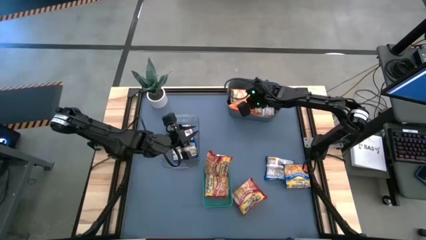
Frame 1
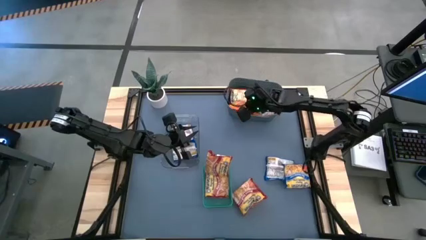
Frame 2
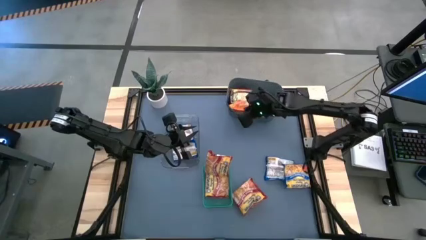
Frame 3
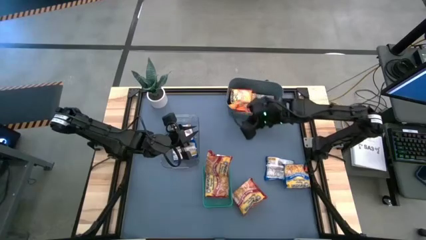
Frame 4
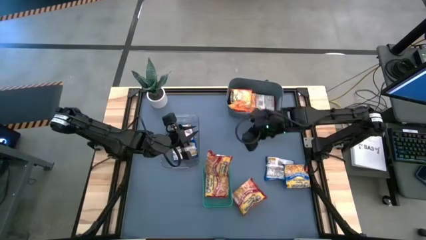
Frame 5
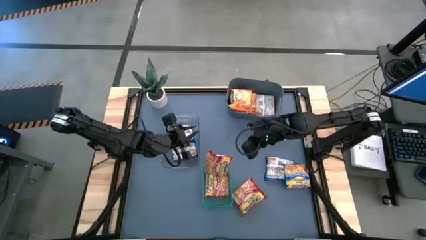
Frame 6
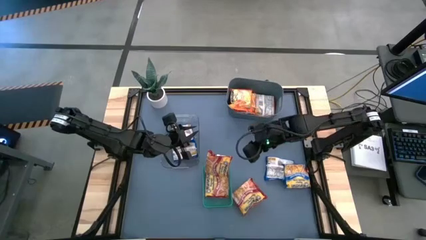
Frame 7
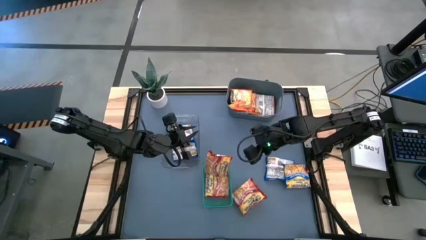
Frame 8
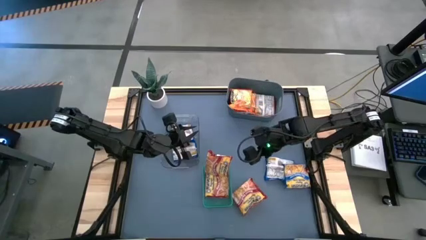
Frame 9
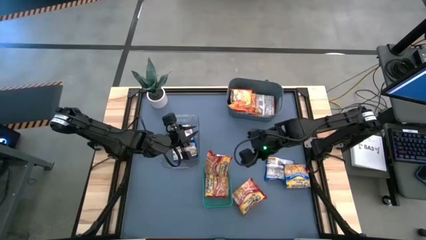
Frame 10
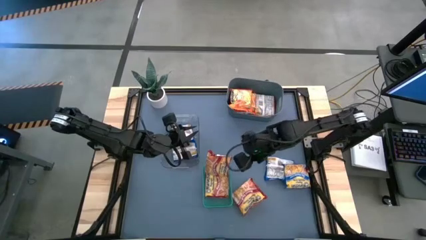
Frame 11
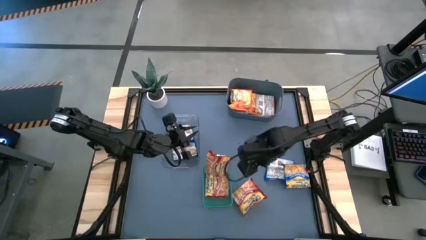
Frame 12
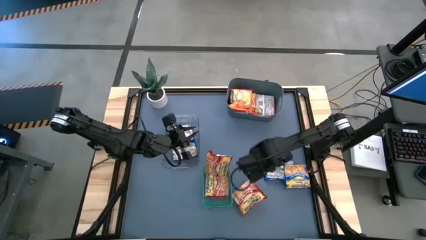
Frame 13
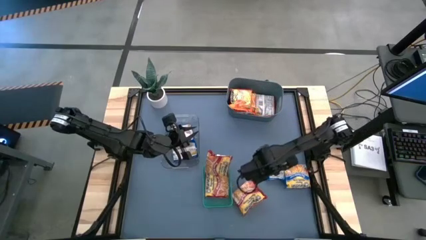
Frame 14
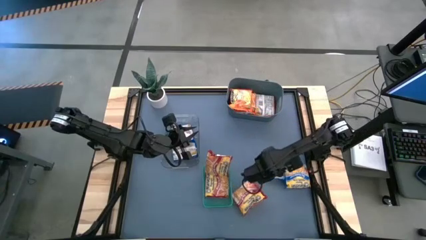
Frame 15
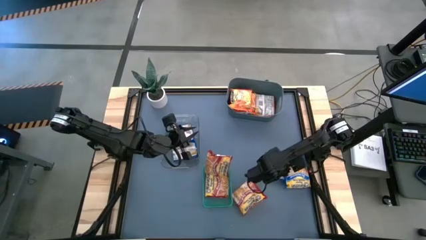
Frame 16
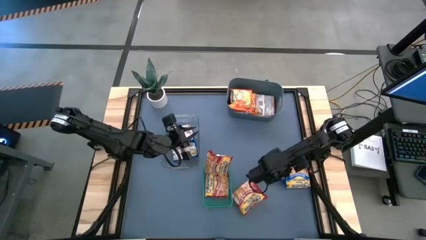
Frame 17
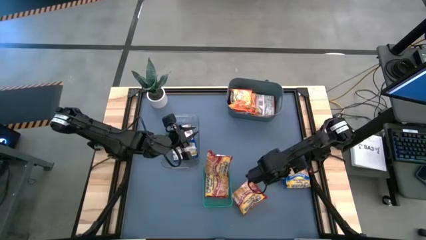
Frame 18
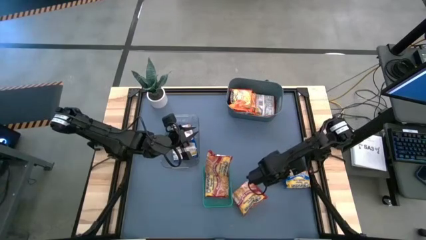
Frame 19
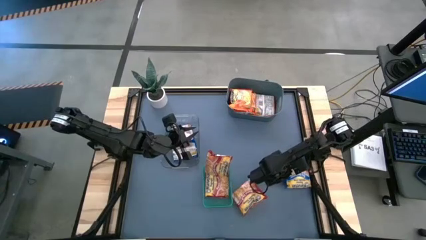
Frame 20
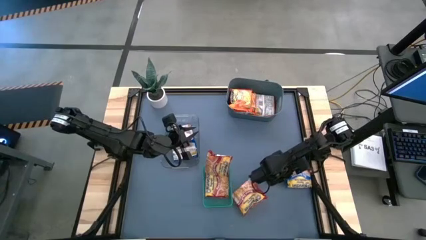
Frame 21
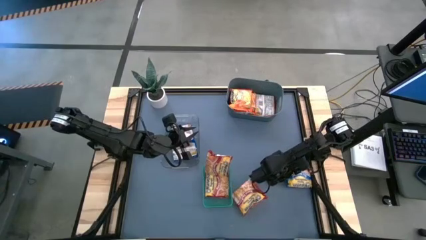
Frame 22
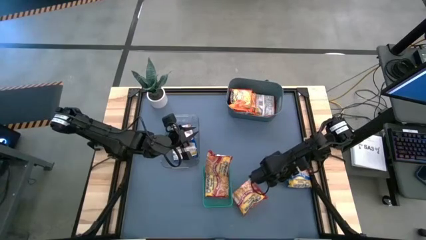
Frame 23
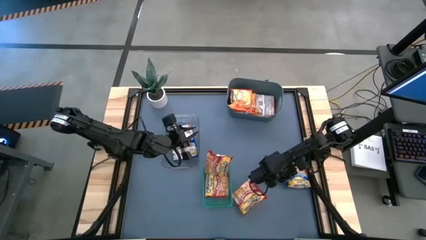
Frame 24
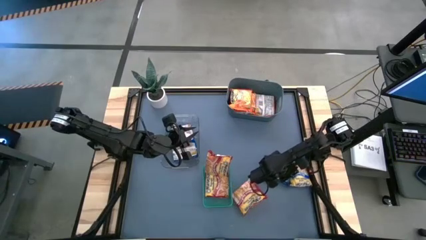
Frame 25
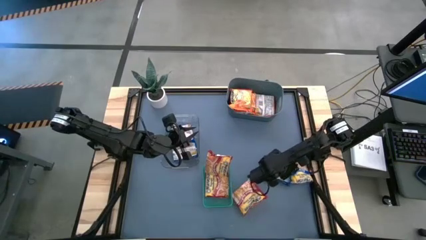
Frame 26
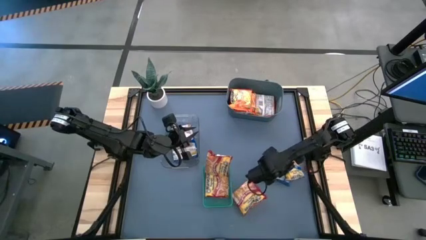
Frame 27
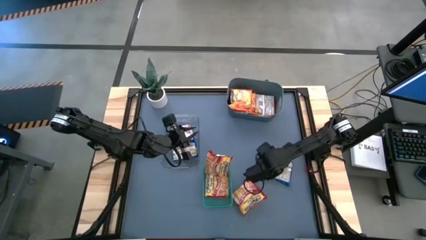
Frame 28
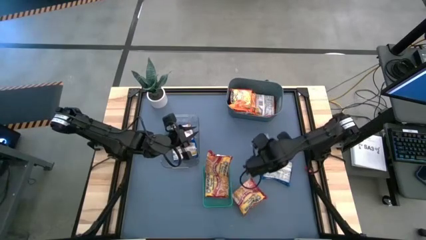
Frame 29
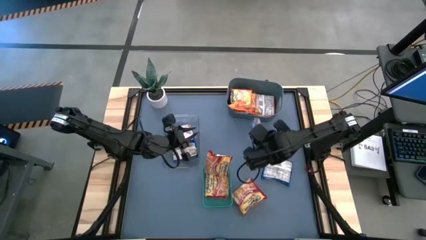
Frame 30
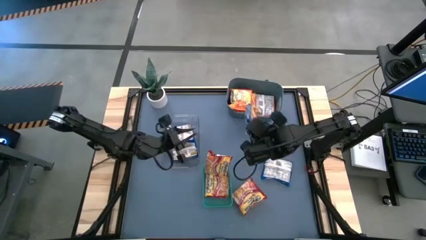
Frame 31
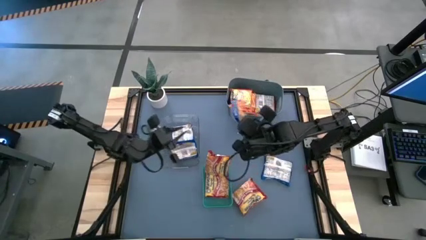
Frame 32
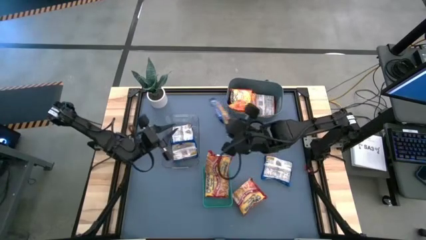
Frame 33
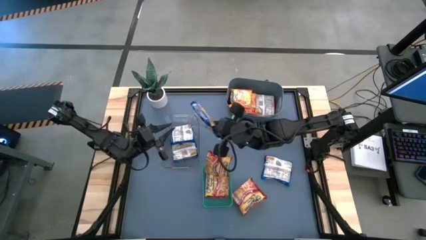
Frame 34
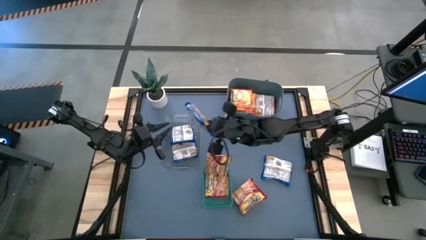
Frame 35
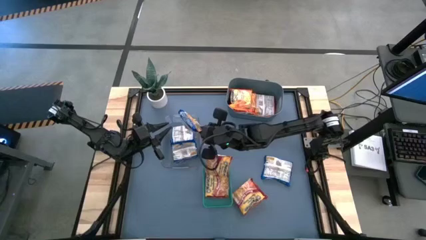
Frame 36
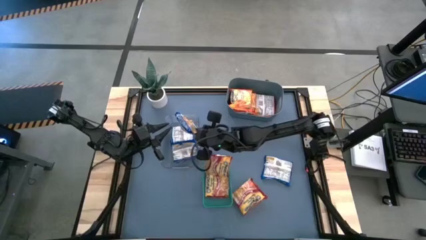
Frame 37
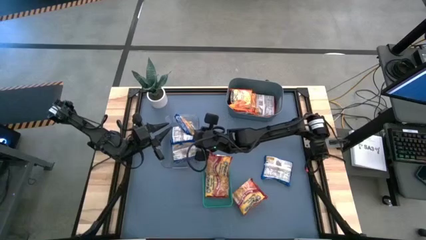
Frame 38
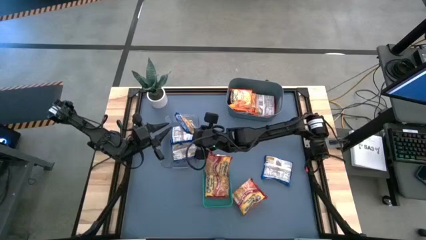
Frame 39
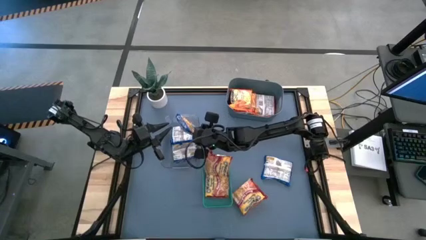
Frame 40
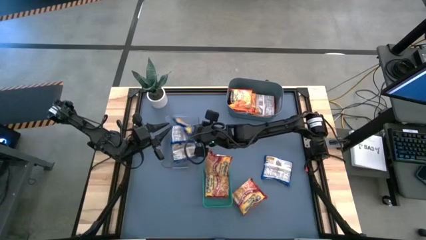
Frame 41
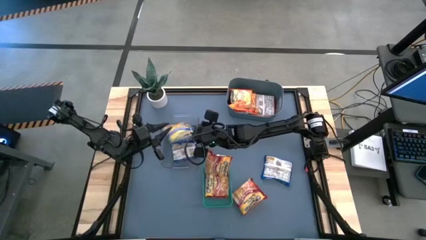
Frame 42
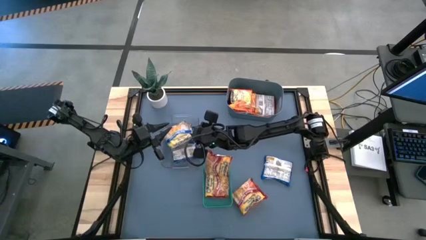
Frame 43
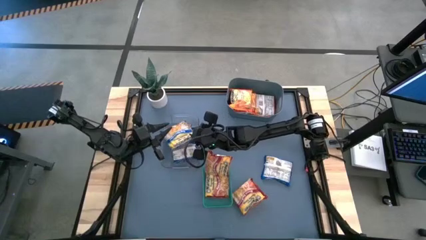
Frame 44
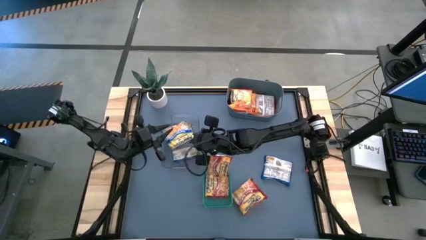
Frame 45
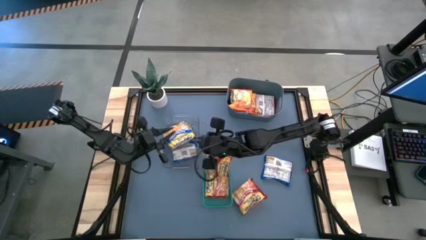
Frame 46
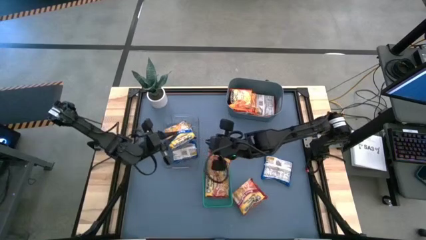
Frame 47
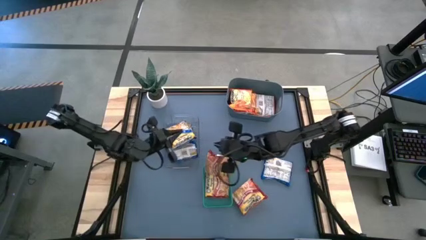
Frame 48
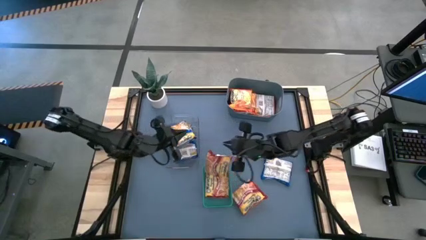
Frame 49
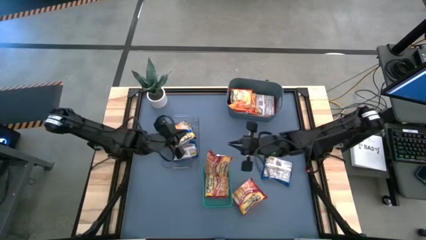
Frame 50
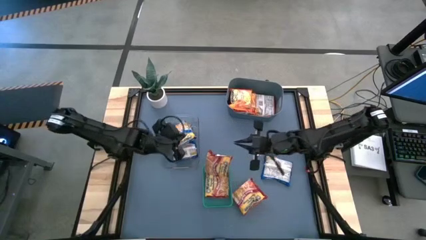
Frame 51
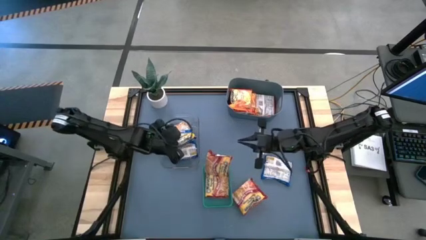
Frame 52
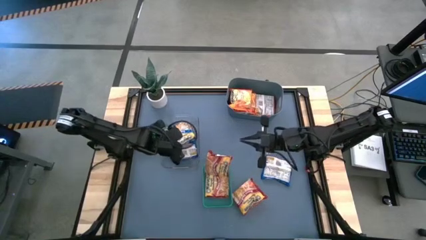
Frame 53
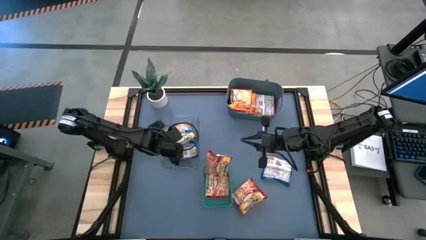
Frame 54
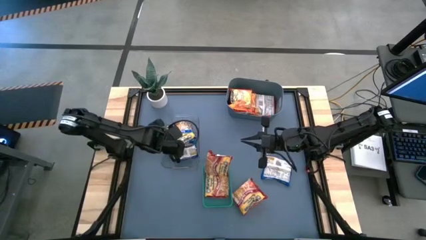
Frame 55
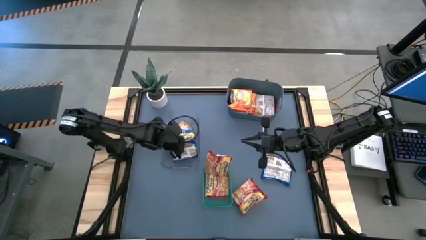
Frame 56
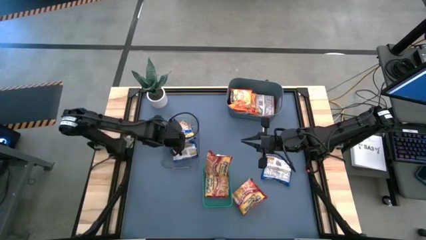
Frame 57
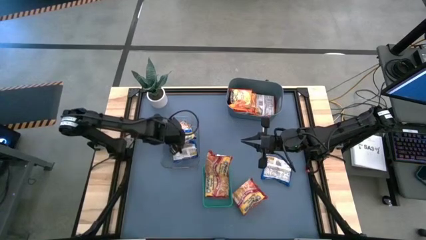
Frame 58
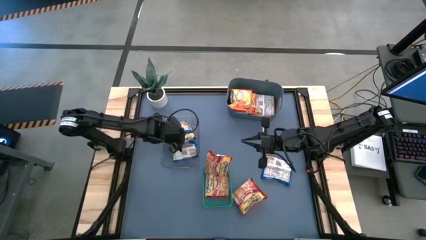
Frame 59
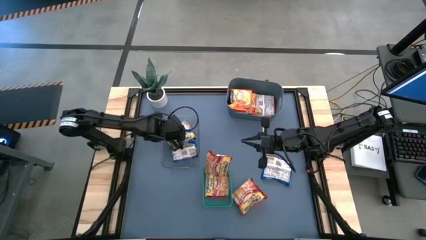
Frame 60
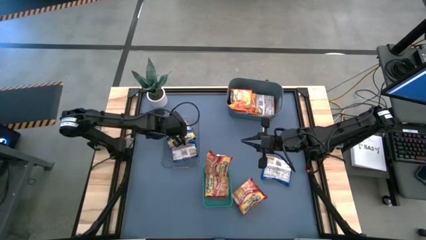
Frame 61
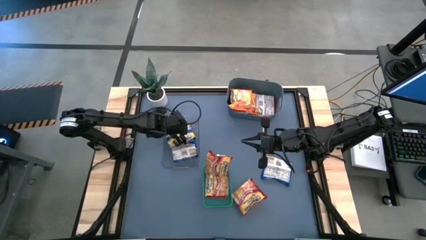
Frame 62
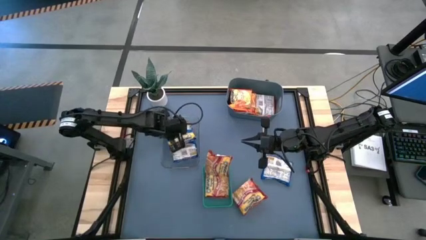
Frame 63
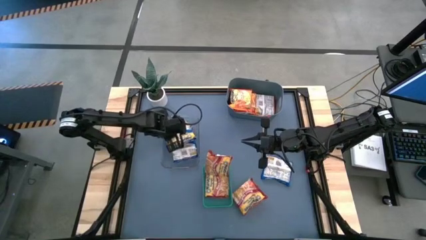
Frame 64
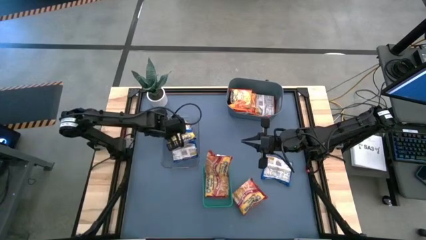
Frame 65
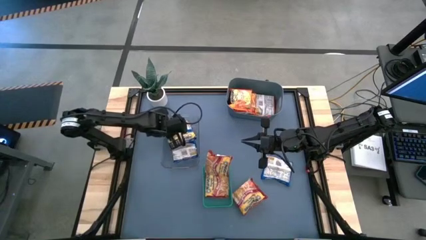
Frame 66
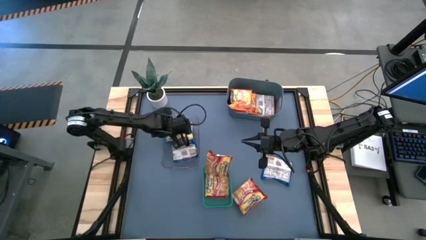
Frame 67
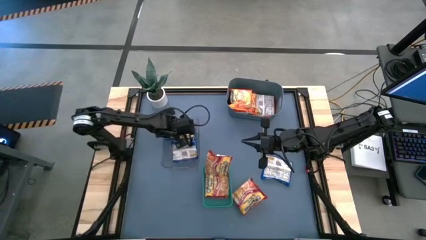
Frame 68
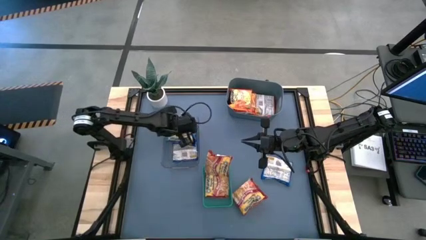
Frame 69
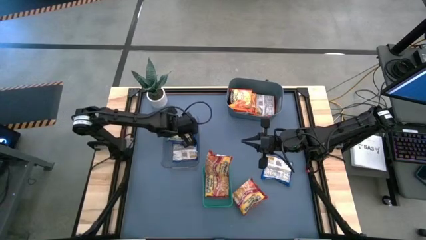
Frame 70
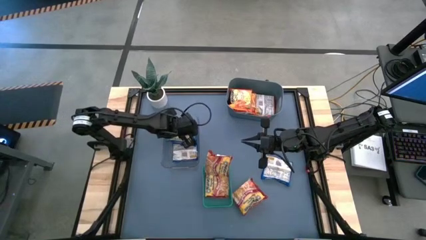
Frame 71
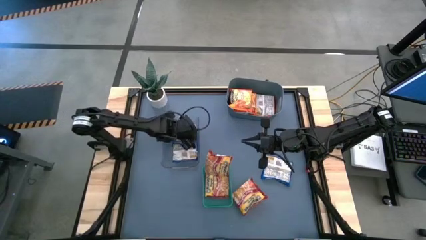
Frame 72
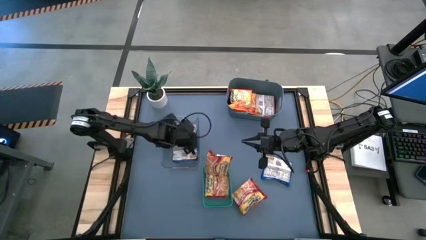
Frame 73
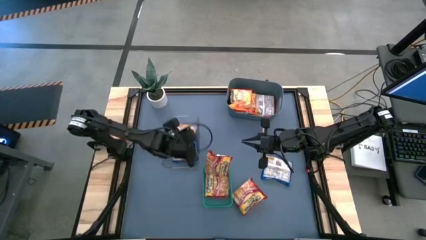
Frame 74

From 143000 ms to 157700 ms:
Task: Sort Maruchan noodles
Put the blue noodle pack into the transparent bin

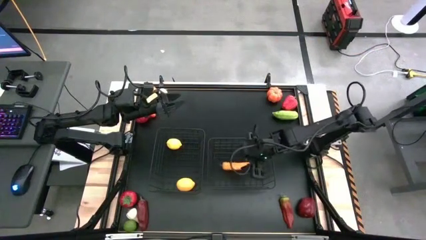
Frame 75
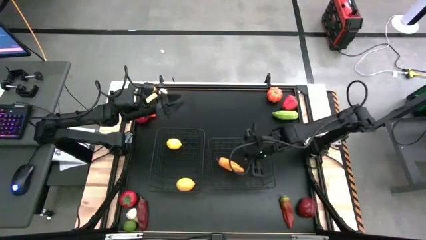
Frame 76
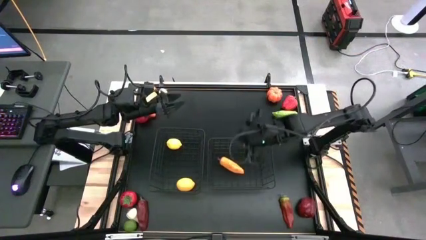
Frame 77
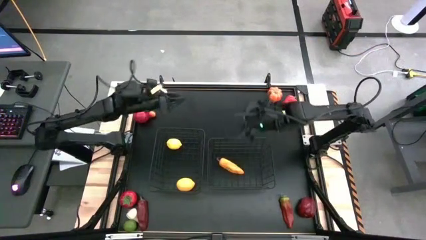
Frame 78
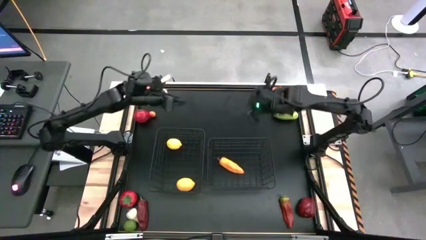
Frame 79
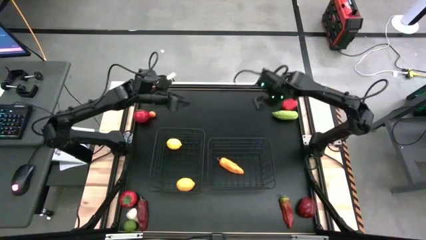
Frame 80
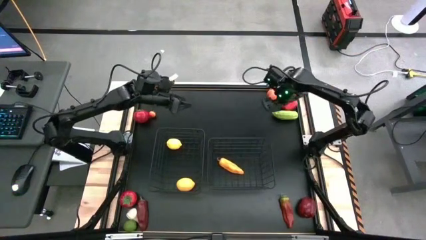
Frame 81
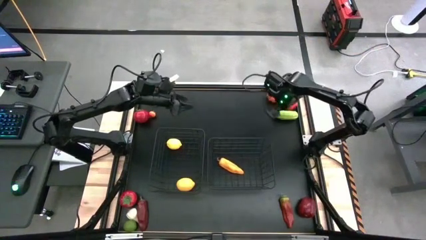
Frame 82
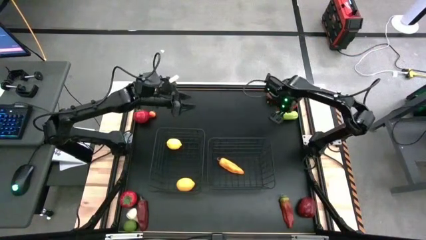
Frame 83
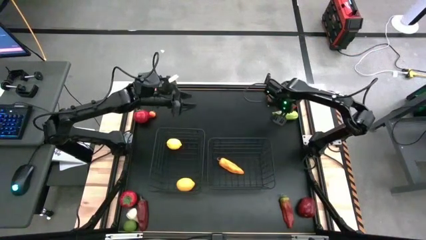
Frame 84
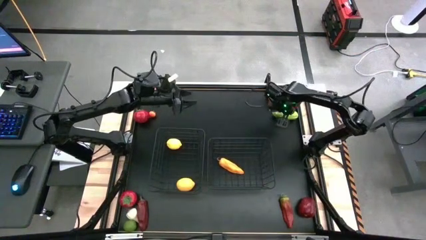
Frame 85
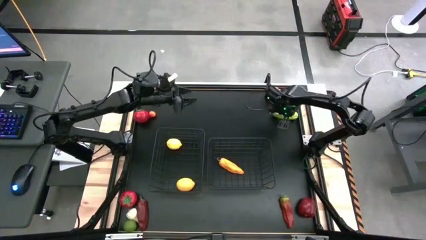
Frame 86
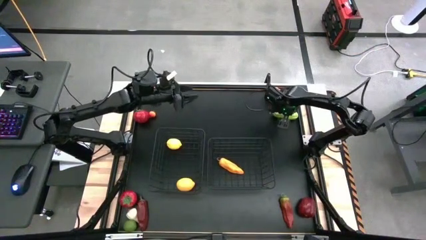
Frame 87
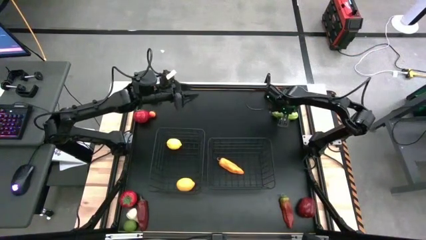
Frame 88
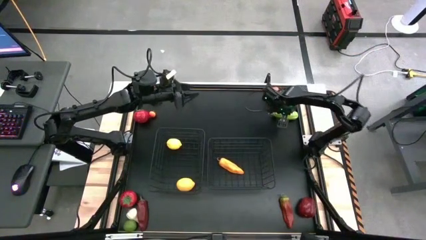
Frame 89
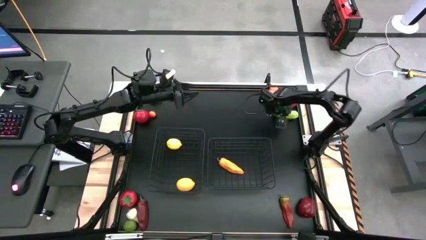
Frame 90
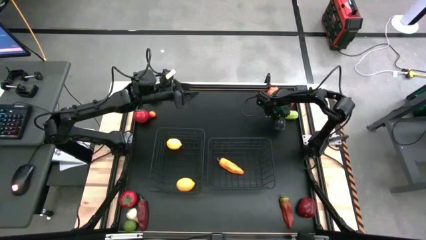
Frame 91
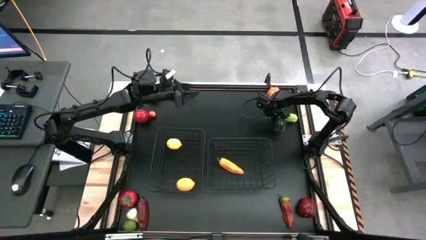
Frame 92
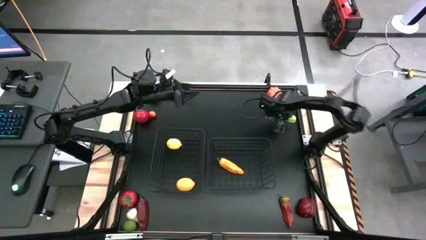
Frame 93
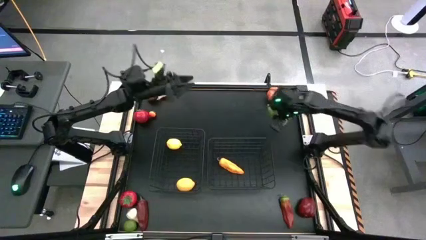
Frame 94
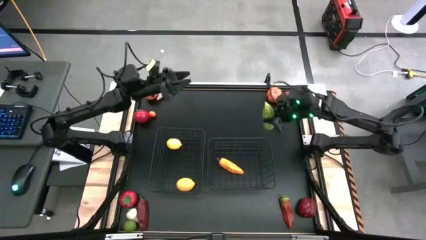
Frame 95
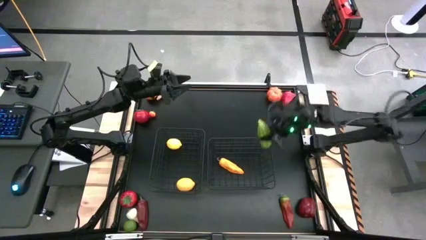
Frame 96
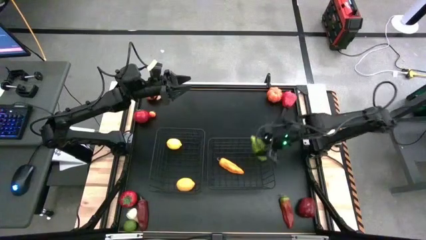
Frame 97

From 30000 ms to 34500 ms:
Task: Sort produce into baskets
Put the green cucumber into the right wire basket
